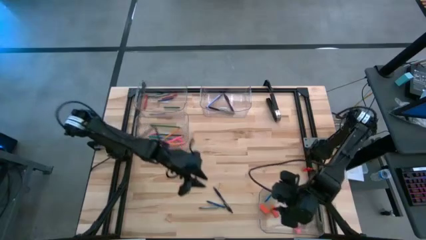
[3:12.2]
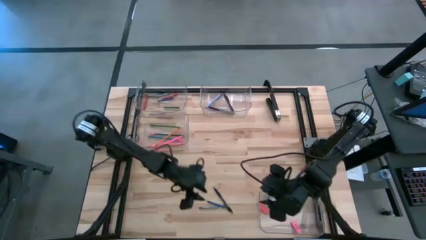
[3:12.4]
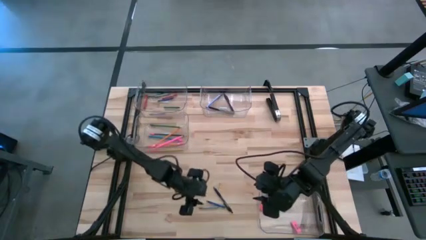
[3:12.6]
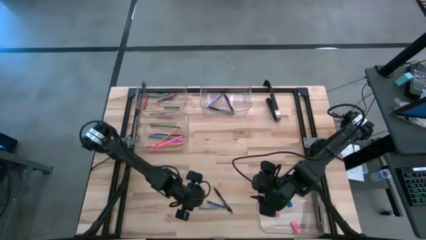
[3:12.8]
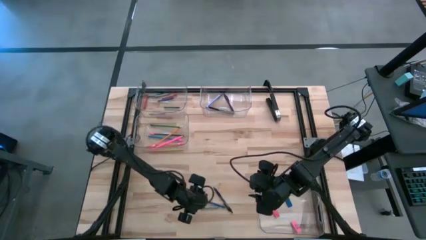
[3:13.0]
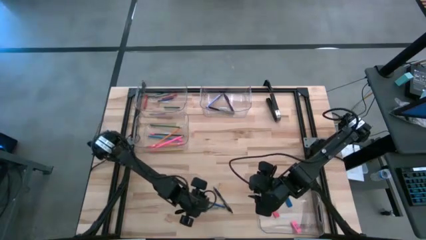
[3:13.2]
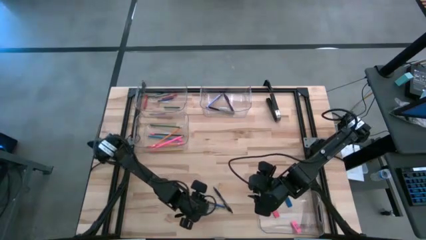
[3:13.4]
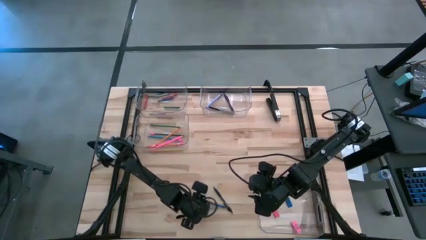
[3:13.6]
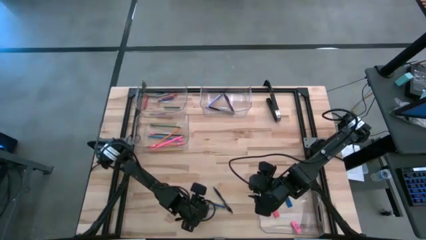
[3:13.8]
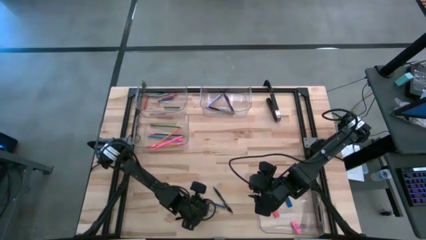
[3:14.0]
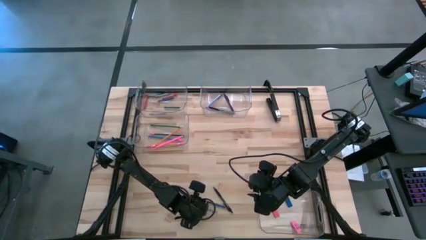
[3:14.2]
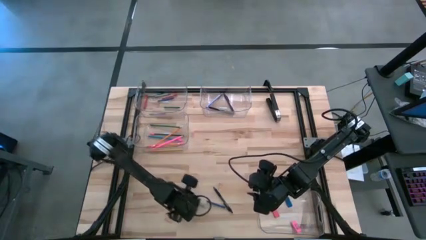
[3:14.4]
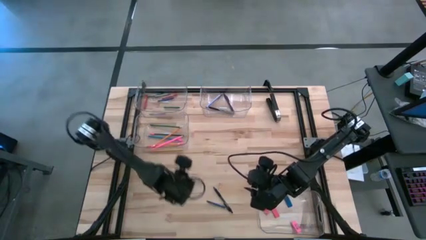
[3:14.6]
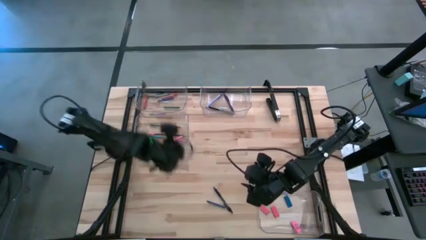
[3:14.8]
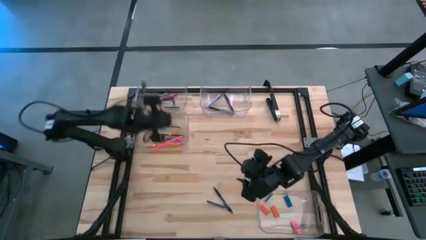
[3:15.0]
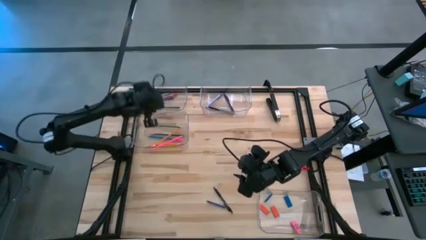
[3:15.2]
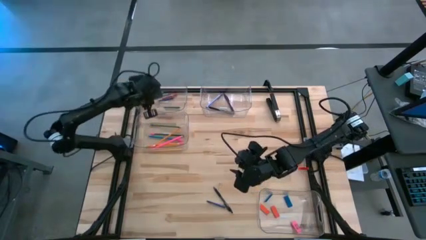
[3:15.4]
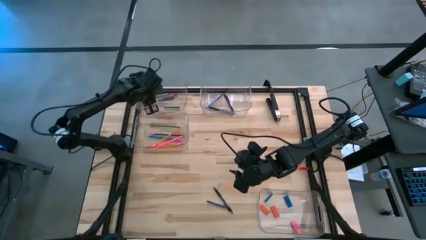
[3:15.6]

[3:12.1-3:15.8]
Task: Sort crayons/erasers/pens/pencils in bins
Put the gray crayon into the top left transparent bin

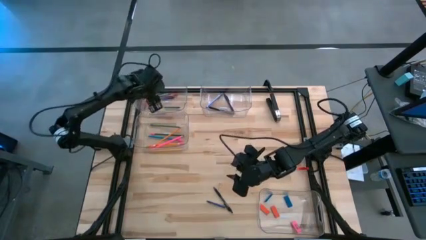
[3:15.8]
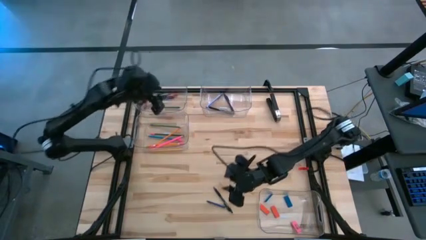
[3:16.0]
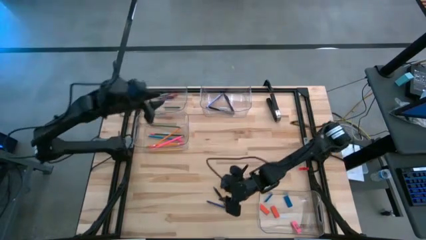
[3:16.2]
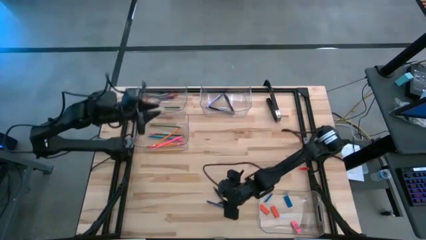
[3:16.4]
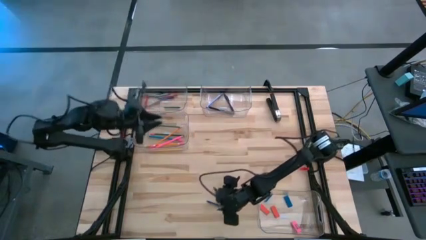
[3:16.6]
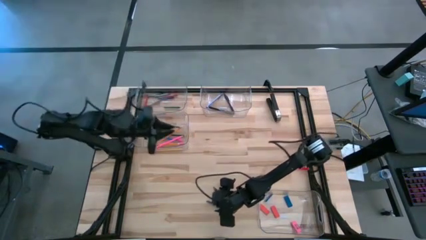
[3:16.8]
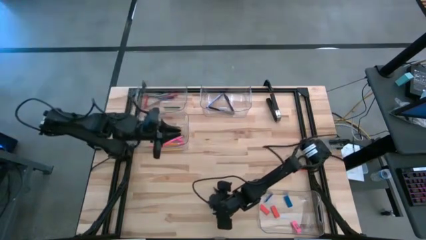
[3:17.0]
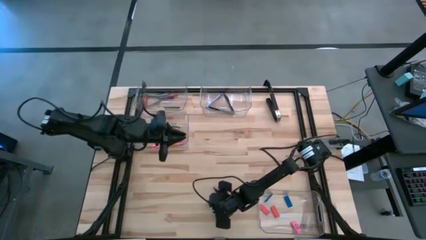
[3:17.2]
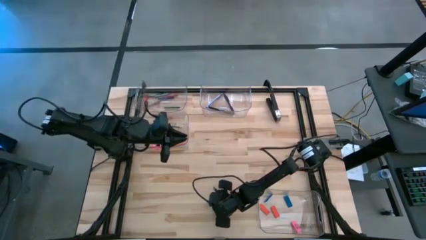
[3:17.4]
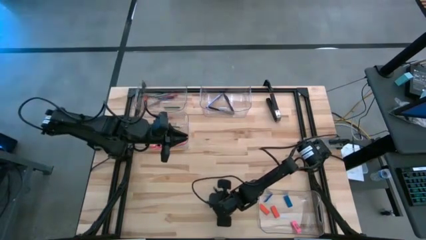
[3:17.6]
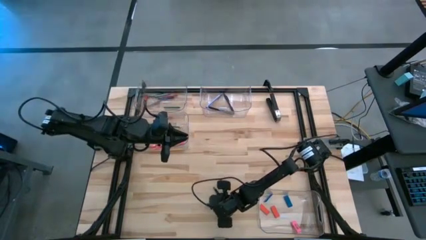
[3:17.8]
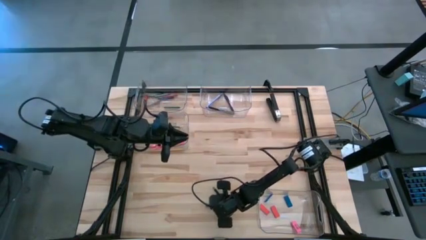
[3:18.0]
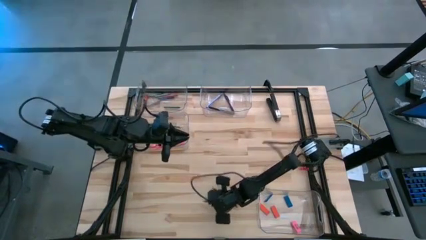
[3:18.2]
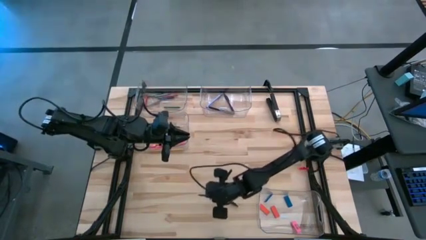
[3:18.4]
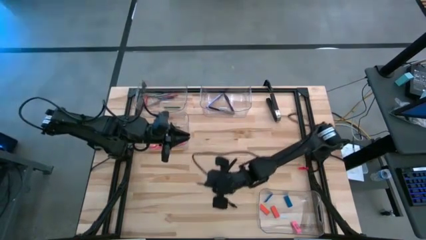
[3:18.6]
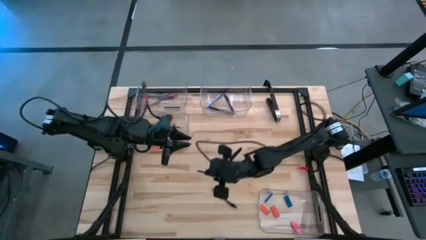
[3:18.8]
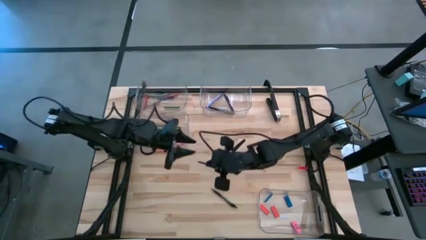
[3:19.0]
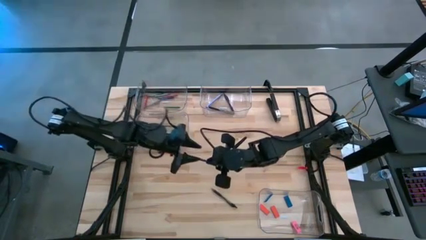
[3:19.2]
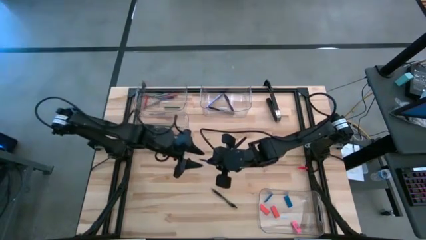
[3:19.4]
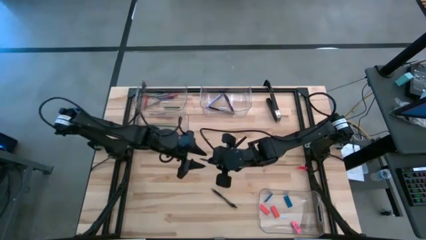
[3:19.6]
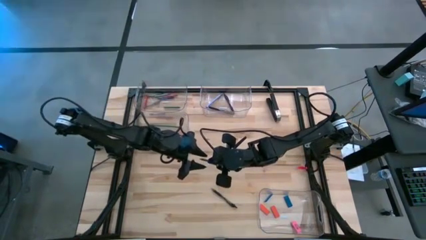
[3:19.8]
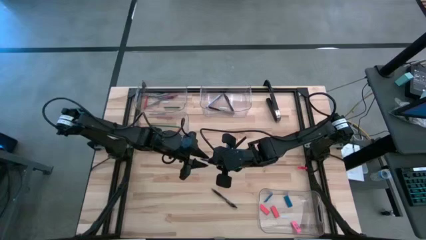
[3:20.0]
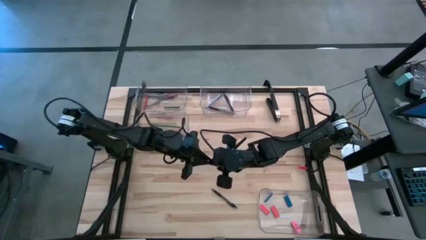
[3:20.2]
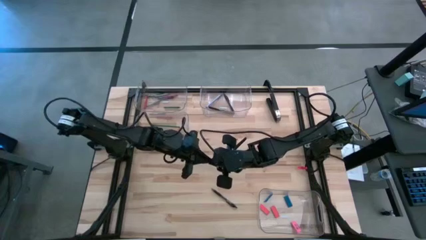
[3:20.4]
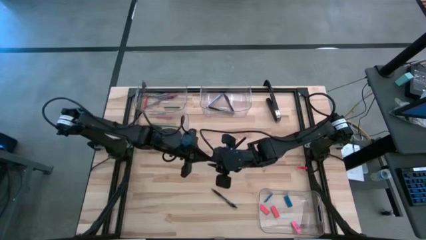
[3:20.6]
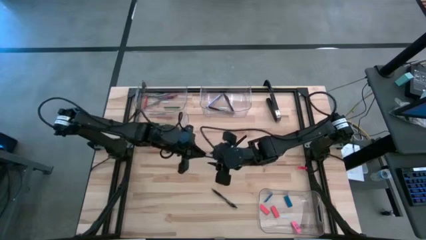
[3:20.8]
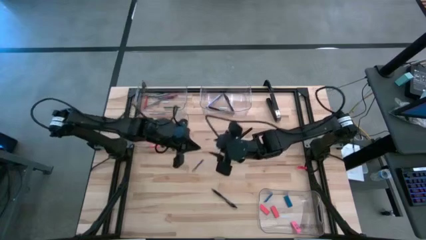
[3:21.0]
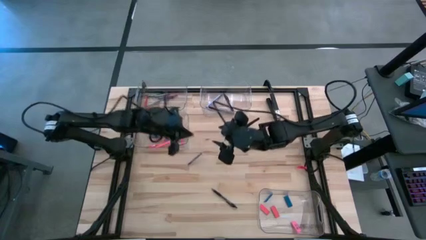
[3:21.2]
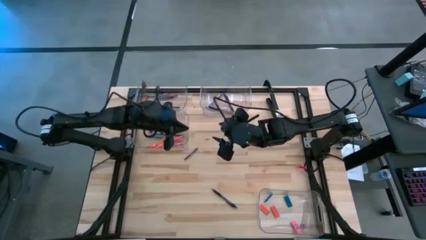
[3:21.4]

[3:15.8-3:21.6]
Put the blue crayon into the top left transparent bin

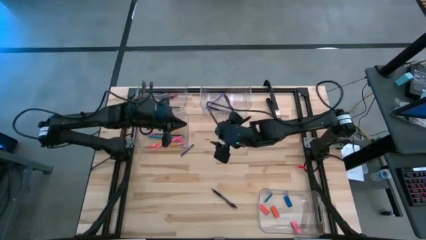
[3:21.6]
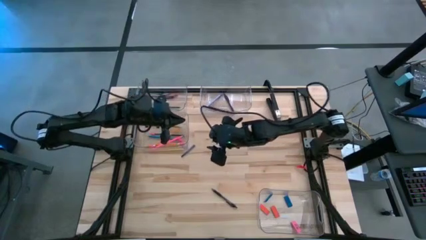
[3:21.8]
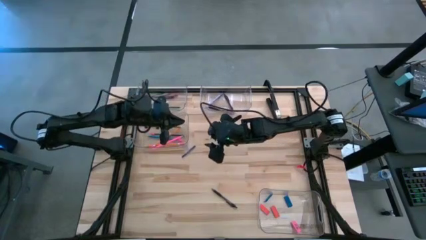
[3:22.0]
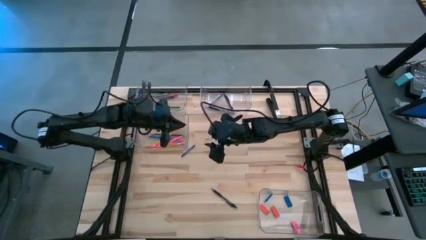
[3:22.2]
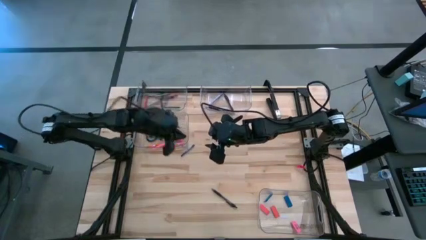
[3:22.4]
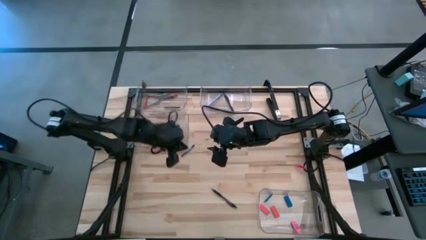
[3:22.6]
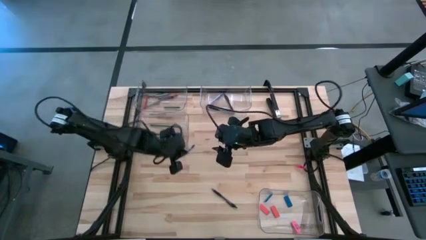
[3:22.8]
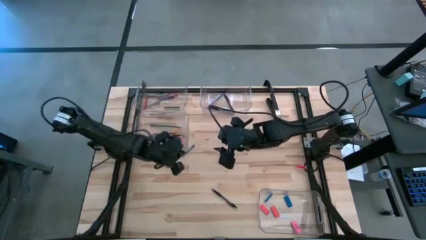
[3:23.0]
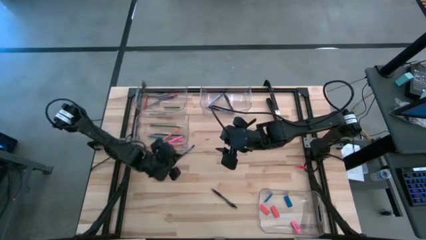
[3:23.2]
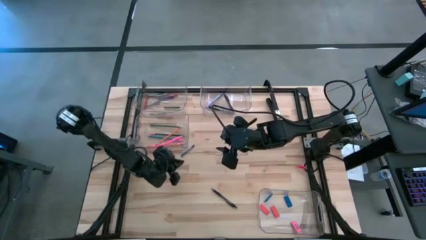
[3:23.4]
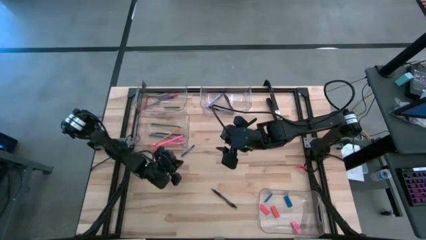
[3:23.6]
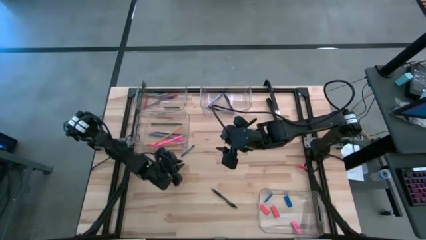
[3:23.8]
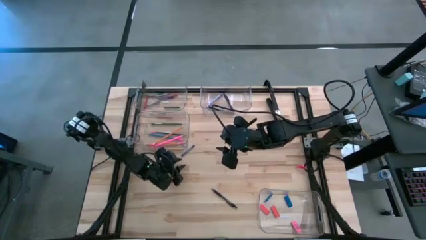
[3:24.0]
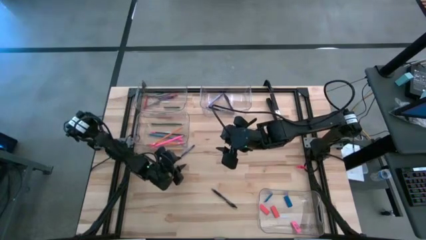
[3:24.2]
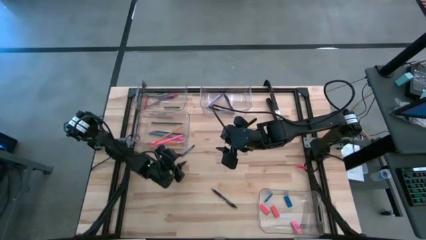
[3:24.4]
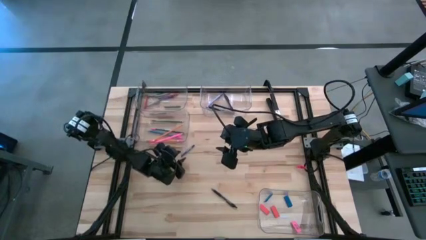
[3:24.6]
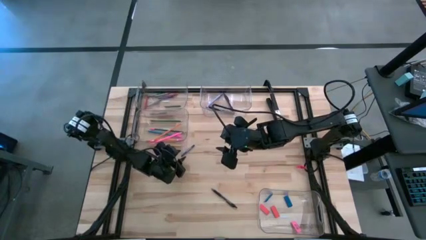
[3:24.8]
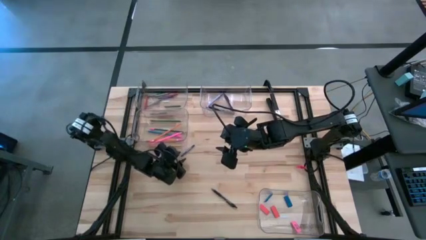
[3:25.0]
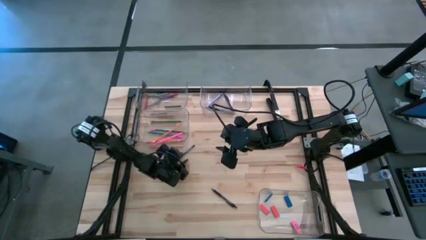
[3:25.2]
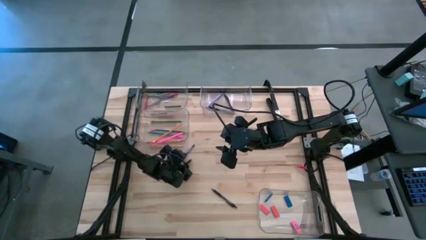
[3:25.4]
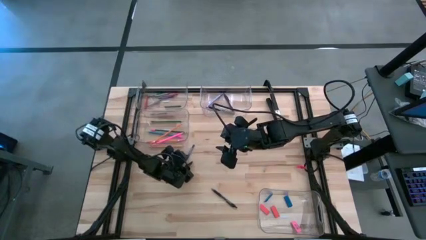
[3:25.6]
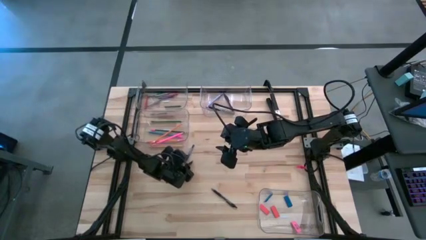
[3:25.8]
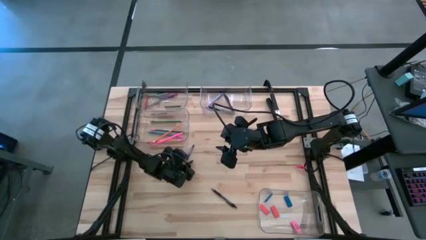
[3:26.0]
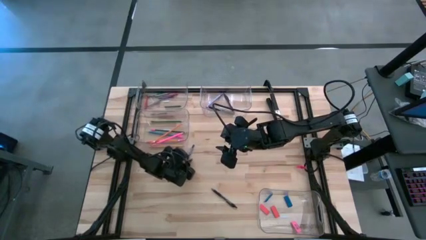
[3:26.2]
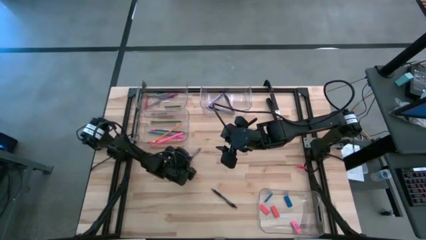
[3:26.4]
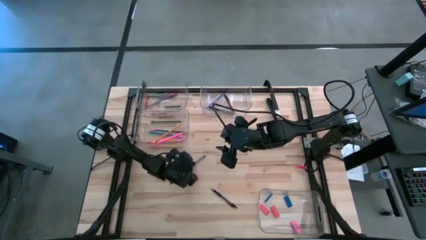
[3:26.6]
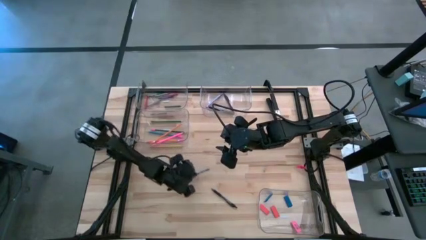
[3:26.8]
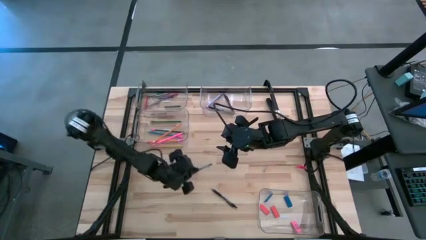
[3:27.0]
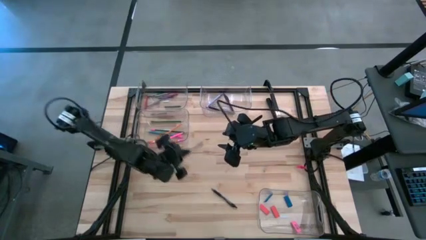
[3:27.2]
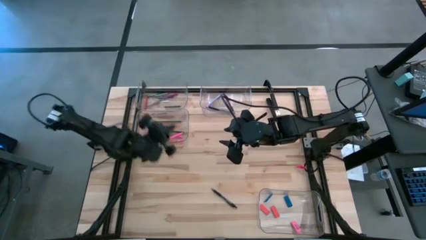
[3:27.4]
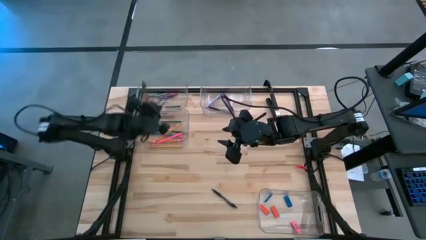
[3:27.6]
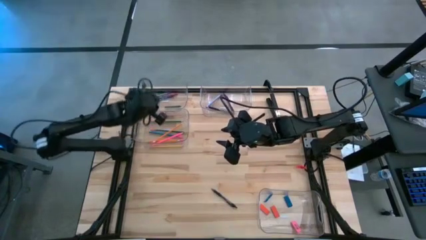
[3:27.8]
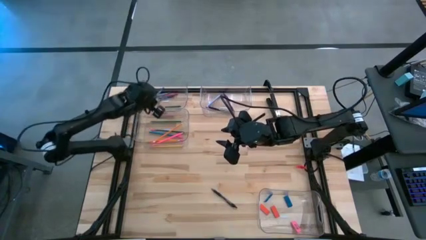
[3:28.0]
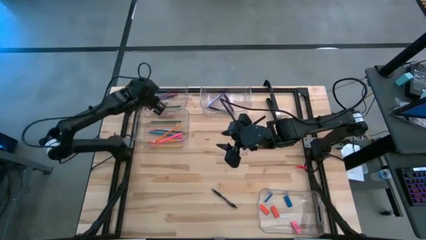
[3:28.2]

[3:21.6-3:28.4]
Put the blue crayon into the top left transparent bin

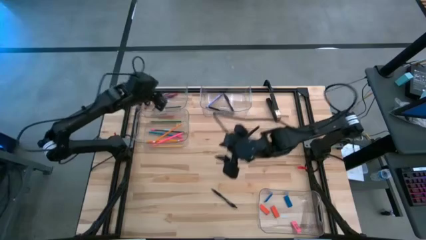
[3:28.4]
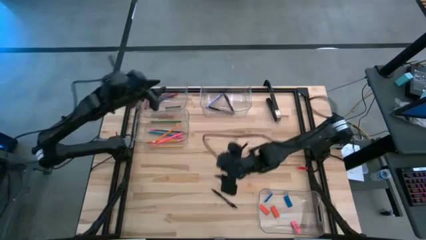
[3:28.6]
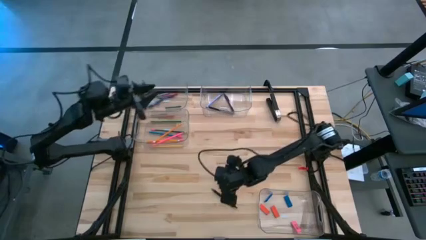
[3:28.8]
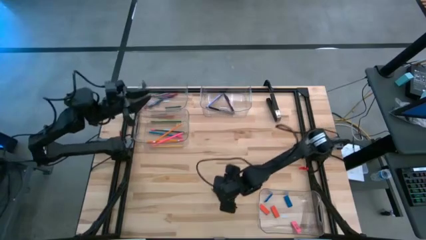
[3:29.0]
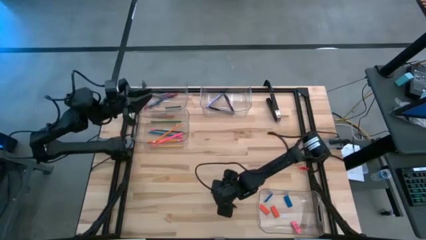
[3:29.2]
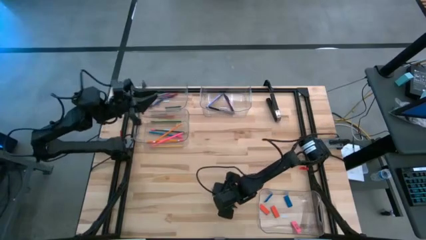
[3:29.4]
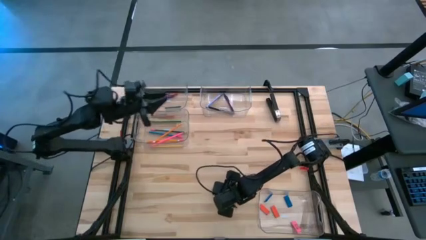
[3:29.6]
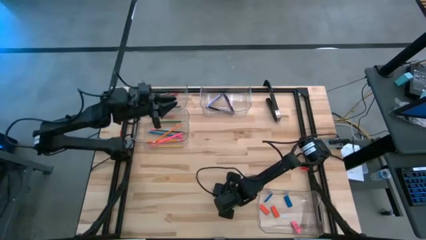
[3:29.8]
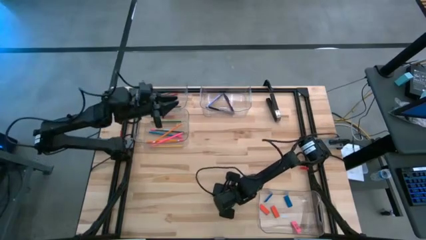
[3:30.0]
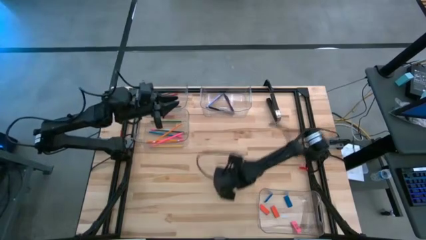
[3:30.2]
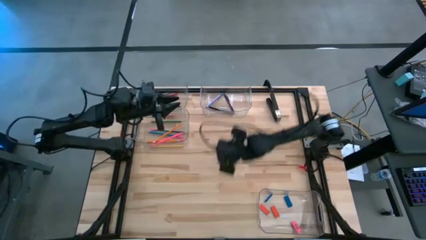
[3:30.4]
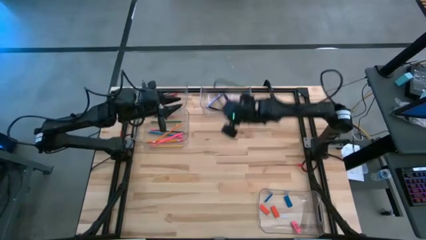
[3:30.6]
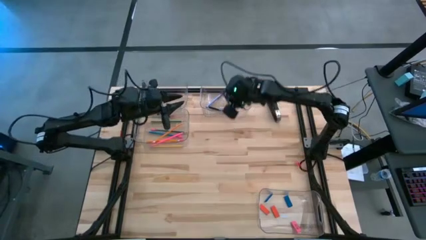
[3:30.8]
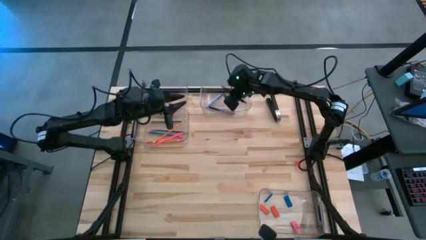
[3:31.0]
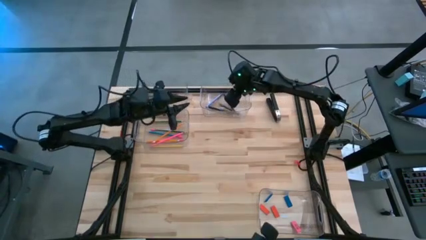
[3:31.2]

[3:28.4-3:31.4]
Put the black pen into the top right transparent bin
